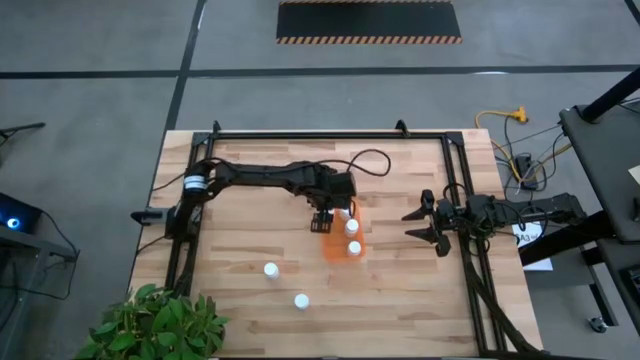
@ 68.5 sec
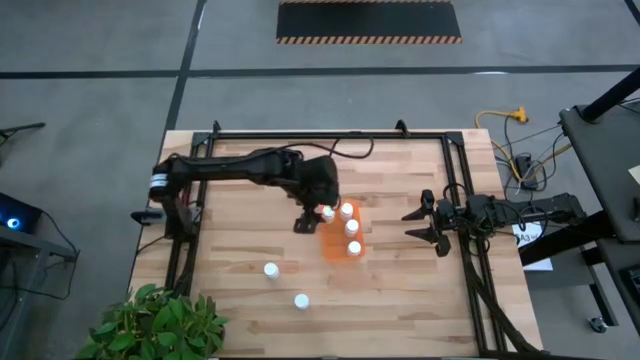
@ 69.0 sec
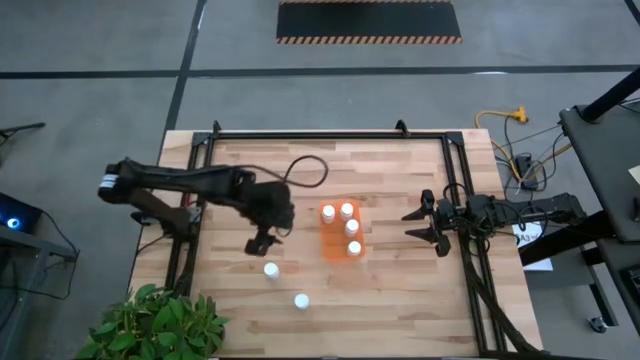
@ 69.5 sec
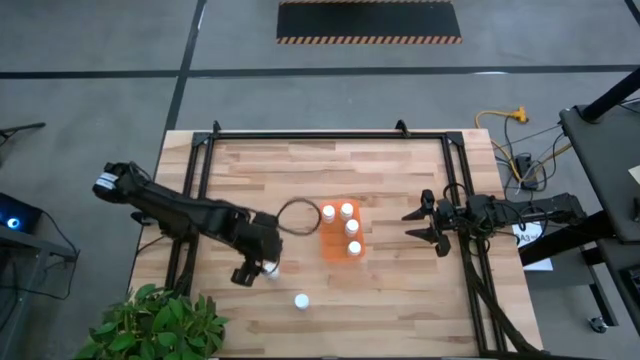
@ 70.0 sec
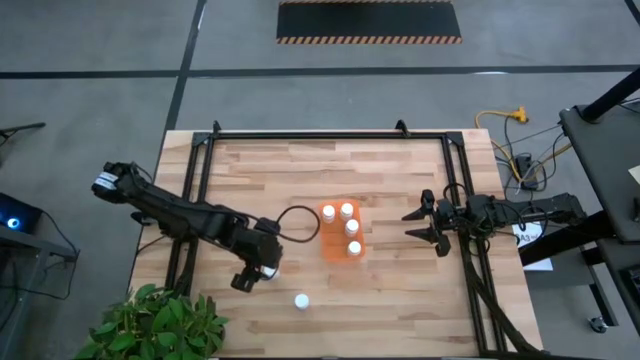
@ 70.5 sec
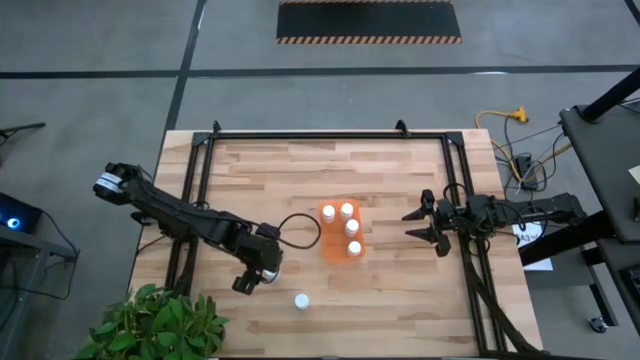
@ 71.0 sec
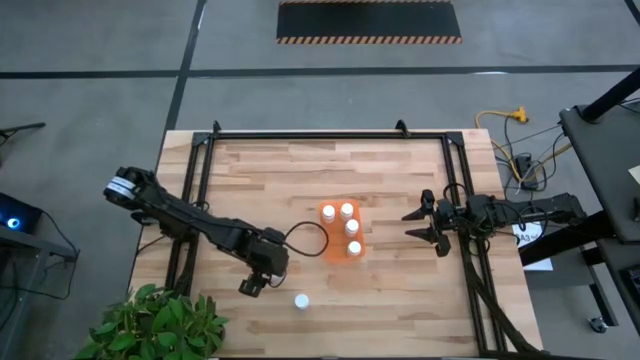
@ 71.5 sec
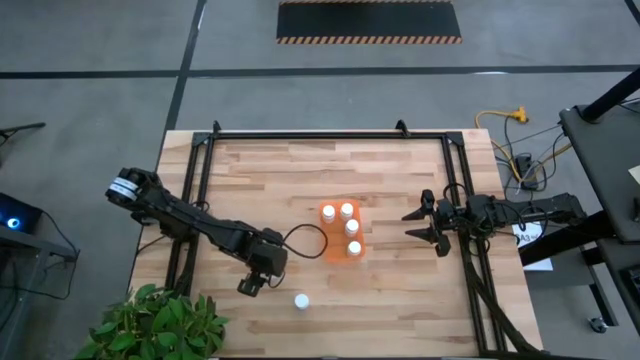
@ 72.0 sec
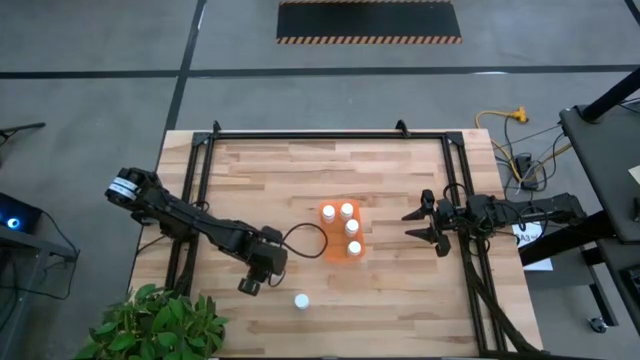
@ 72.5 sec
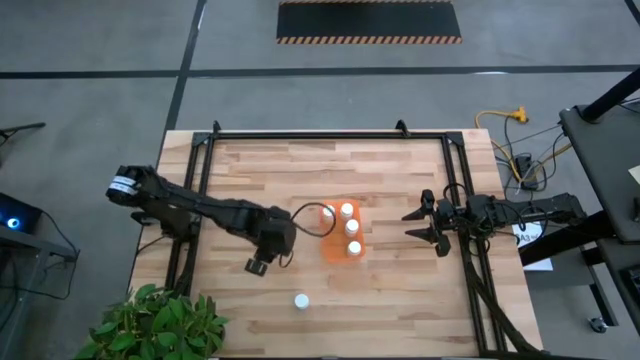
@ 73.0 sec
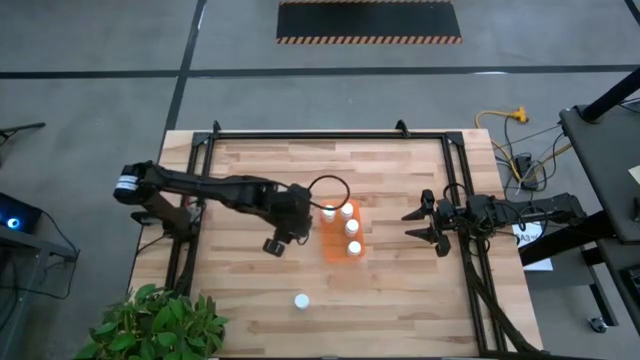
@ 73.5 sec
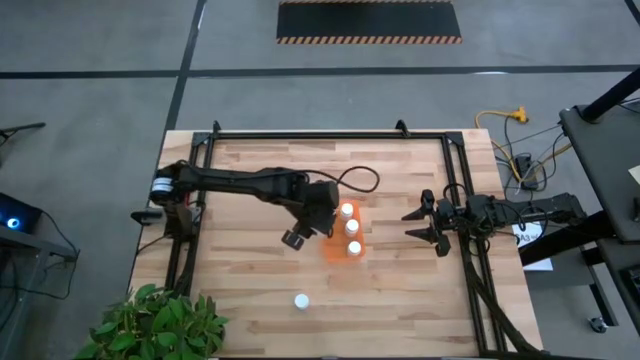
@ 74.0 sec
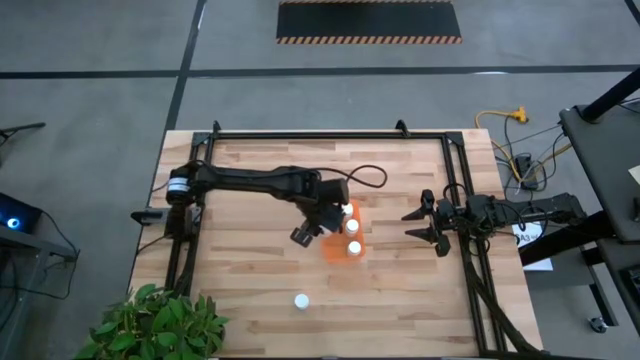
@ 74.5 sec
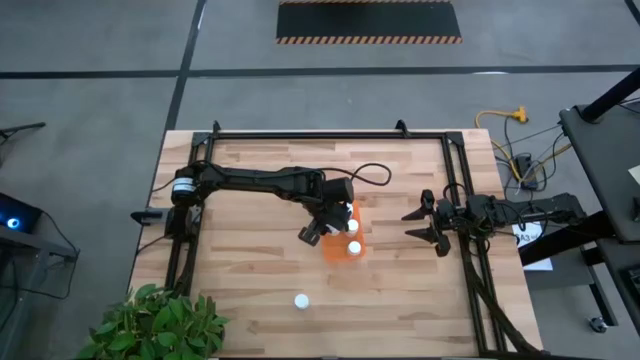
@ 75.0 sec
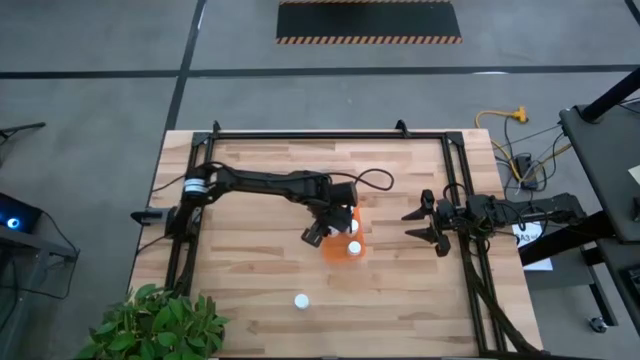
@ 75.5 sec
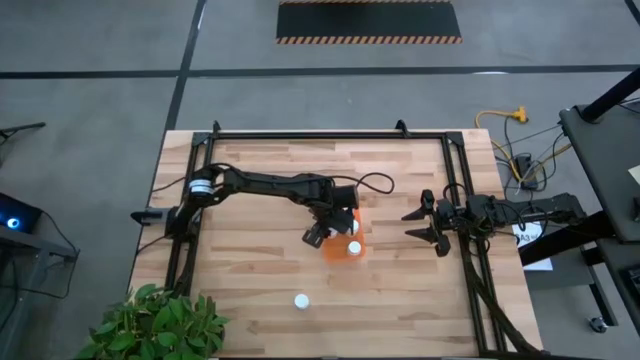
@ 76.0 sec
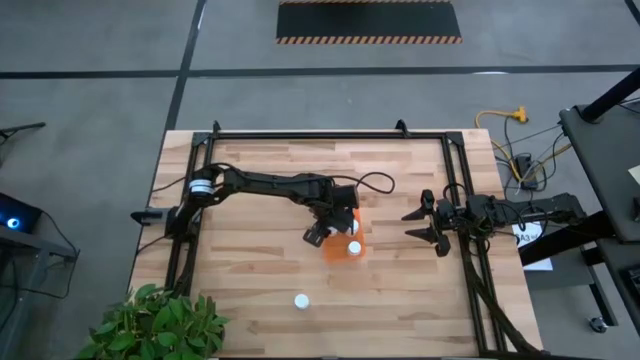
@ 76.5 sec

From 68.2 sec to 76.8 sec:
Task: Pick and place pill bottles into a basket
Put the top white pill bottle into the orange bin

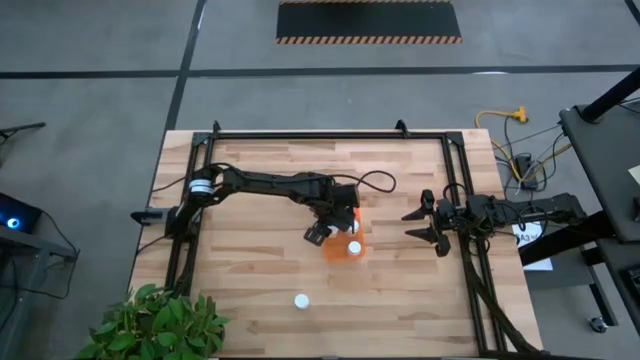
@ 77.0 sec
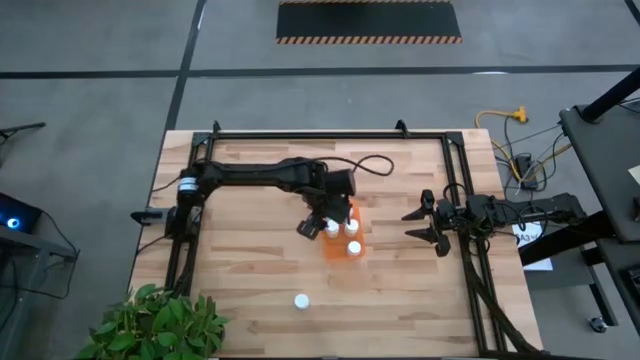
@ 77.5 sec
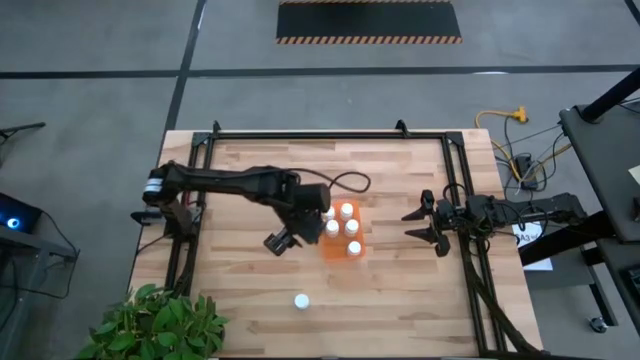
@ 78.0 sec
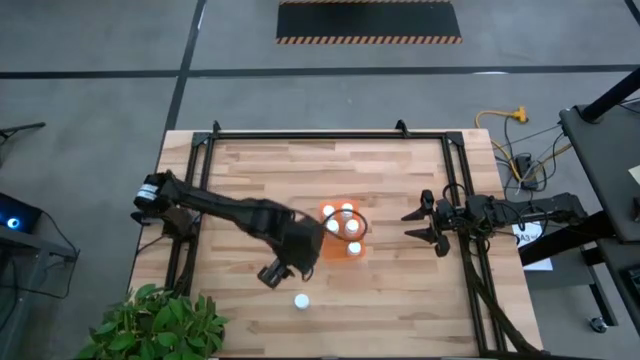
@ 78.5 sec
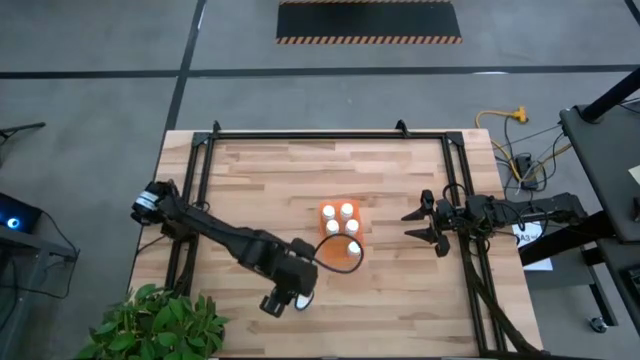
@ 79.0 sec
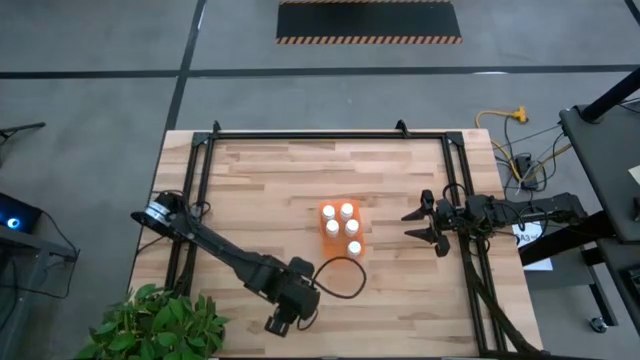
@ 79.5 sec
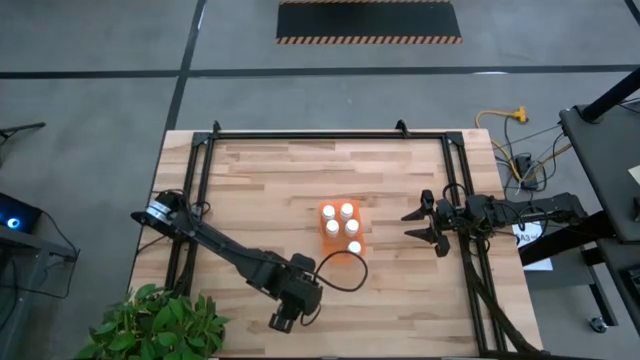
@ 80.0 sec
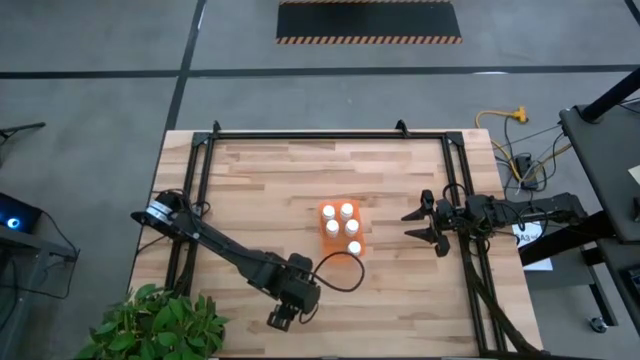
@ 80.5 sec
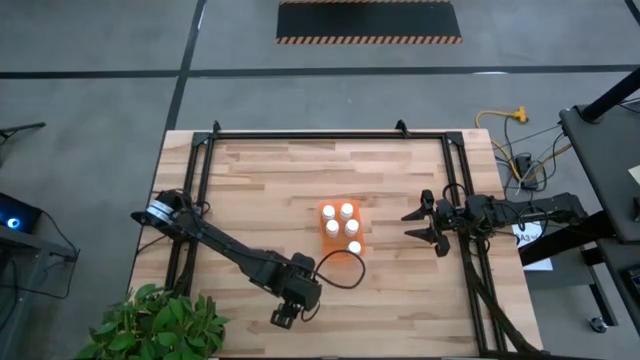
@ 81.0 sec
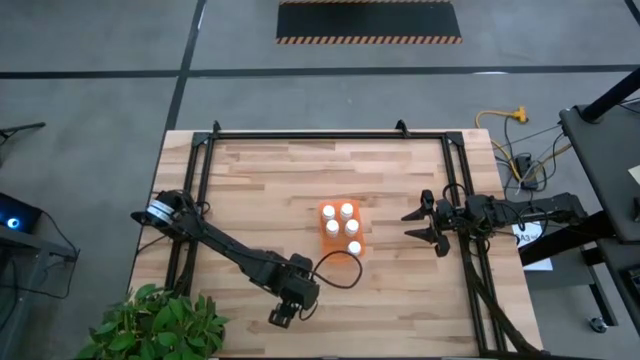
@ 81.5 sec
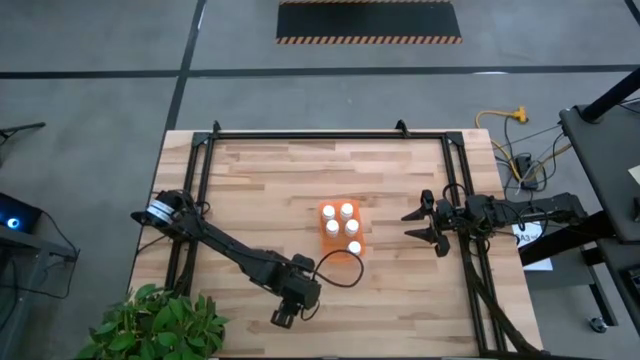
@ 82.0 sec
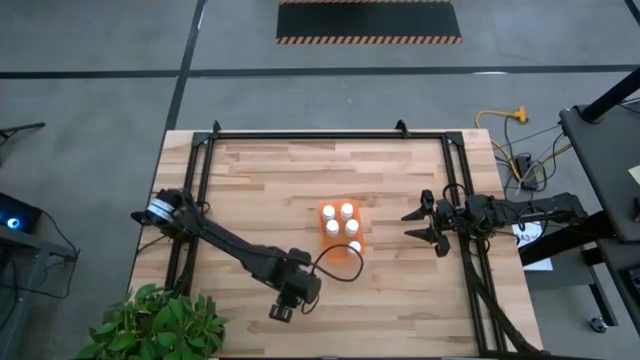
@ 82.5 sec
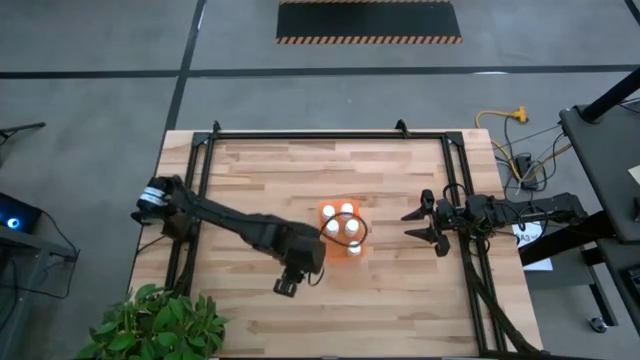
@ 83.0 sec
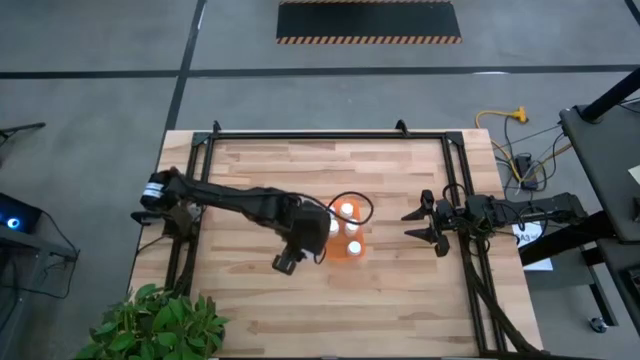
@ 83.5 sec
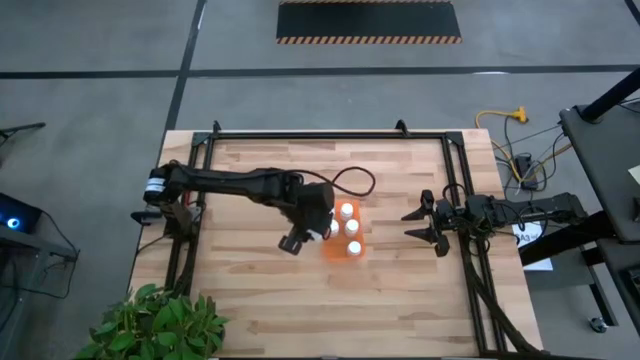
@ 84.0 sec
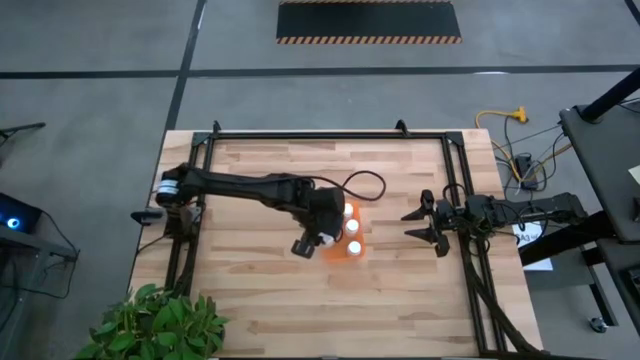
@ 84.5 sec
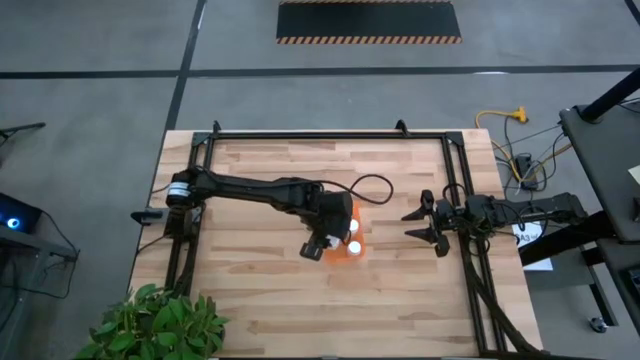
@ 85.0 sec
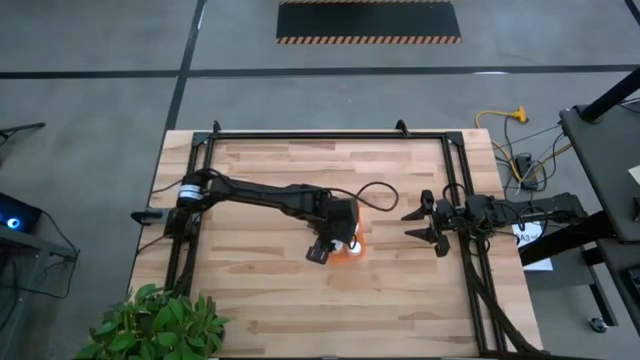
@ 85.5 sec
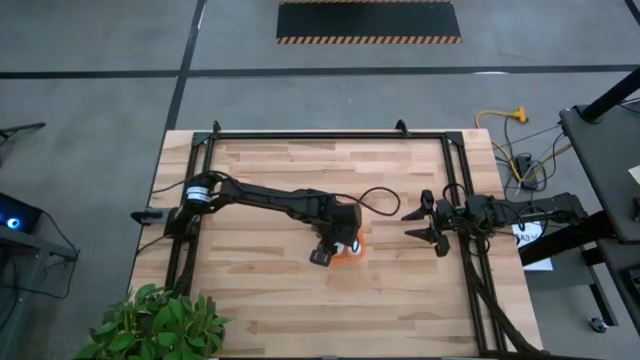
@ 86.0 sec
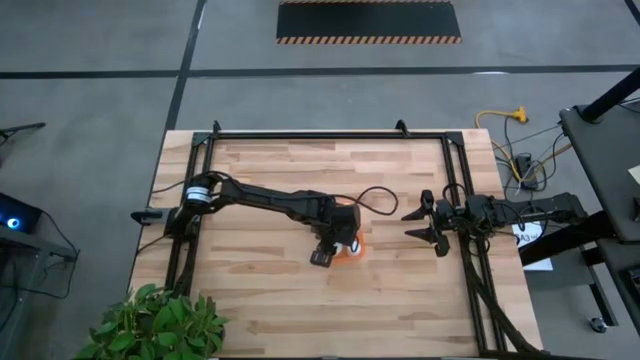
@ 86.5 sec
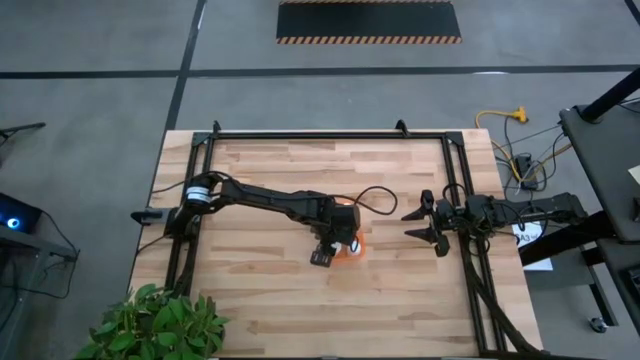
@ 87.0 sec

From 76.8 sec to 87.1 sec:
Put the white pill bottle into the orange bin

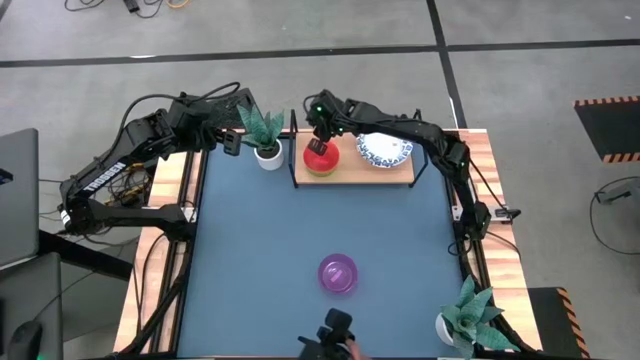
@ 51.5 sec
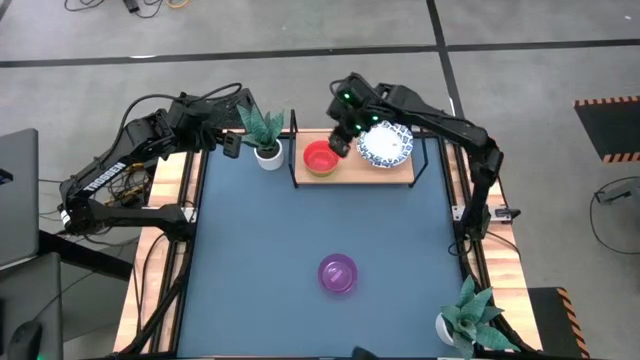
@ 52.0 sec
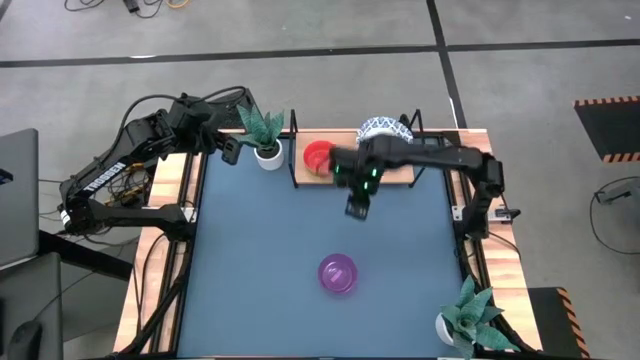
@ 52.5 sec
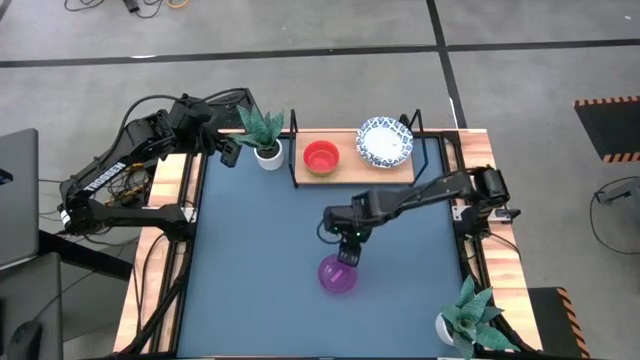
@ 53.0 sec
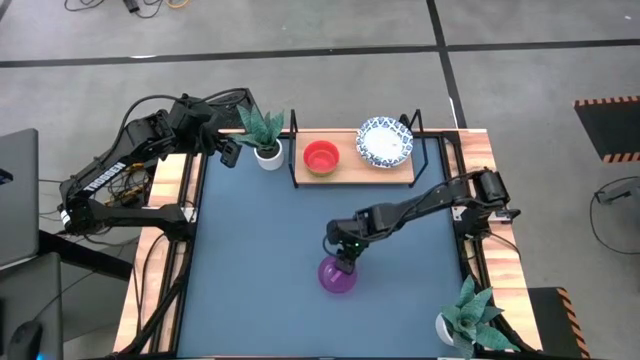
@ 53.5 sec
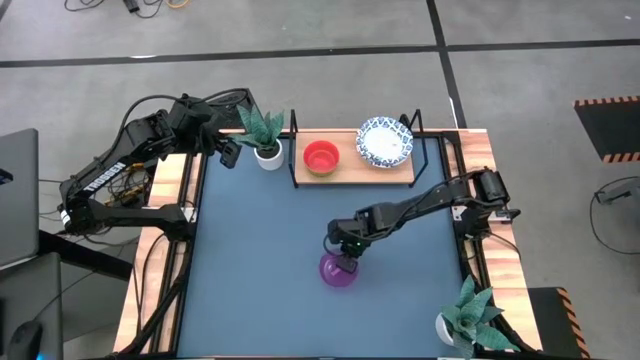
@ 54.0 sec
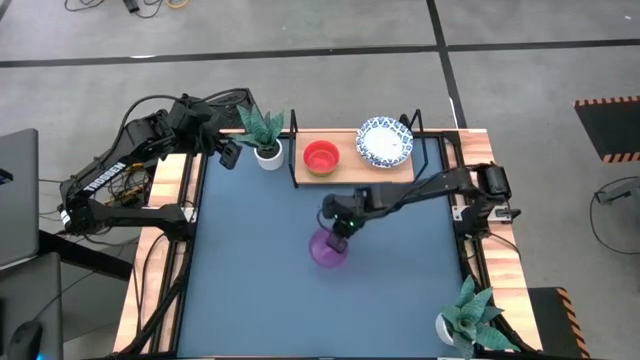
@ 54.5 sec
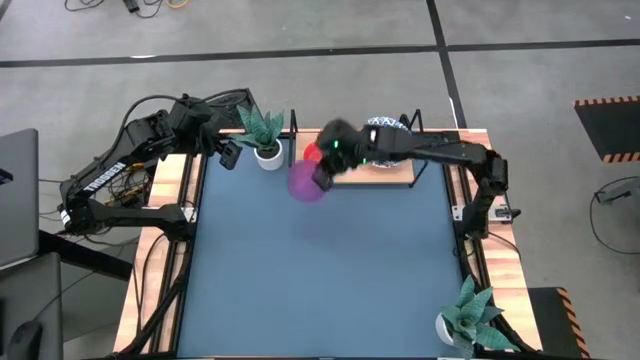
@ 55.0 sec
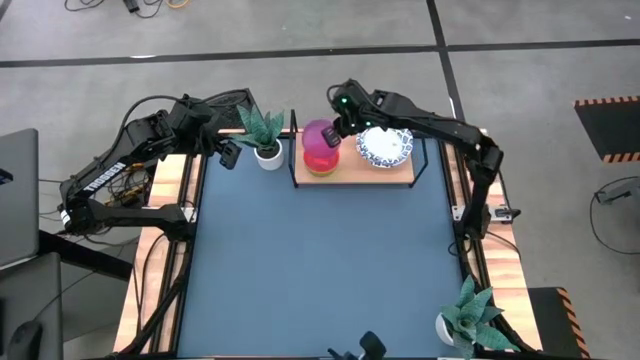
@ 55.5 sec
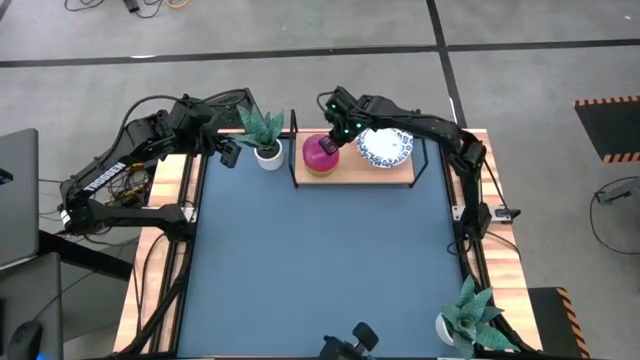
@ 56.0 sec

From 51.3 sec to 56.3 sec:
Task: Place and stack bowls onto a shelf
Stack the purple transparent bowl on top of the orange transparent bowl on the shelf
